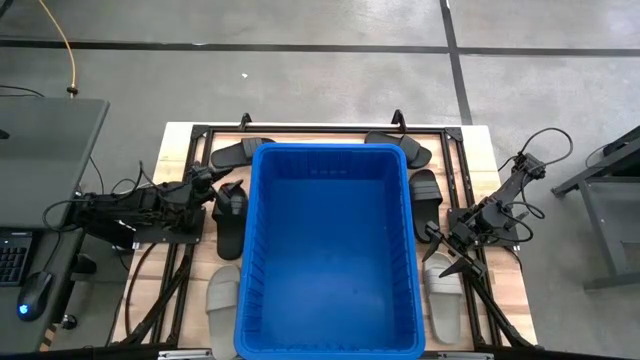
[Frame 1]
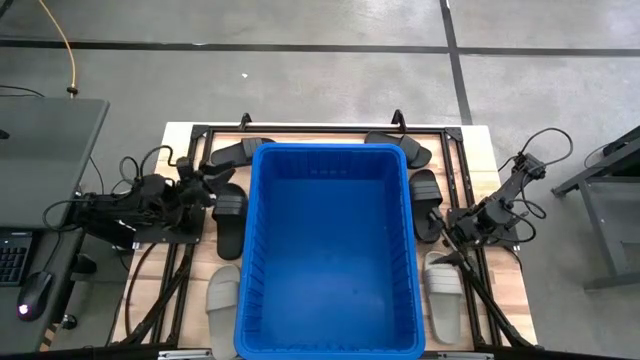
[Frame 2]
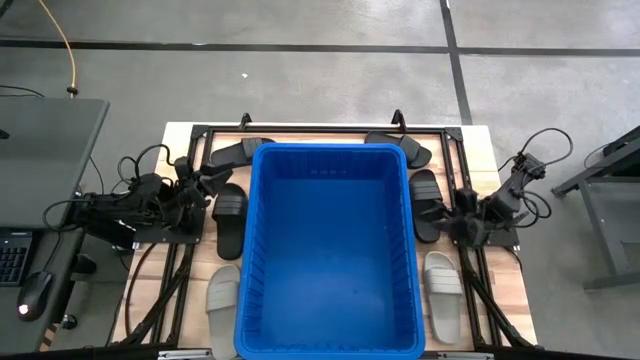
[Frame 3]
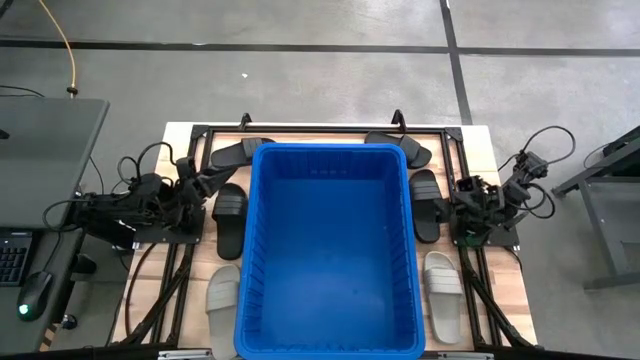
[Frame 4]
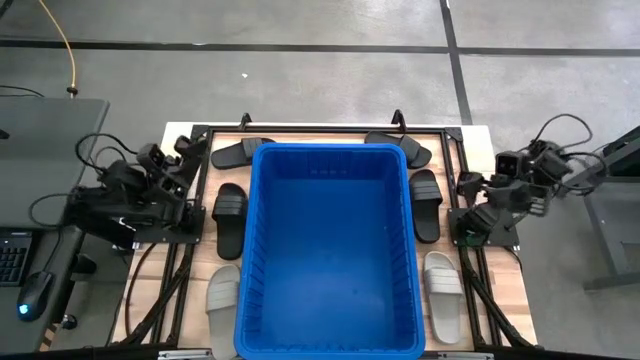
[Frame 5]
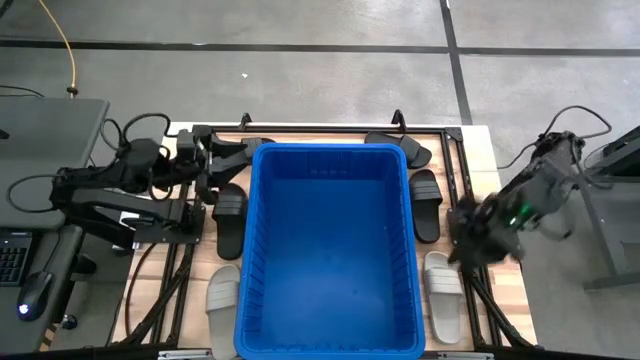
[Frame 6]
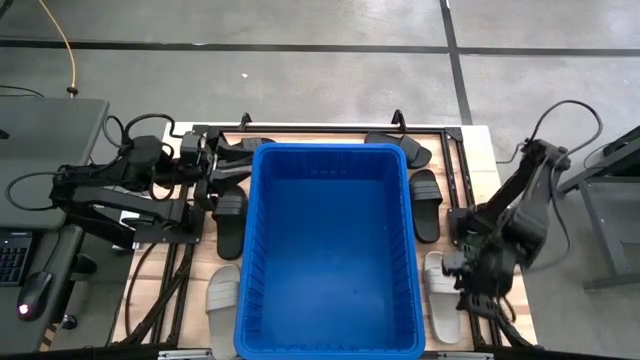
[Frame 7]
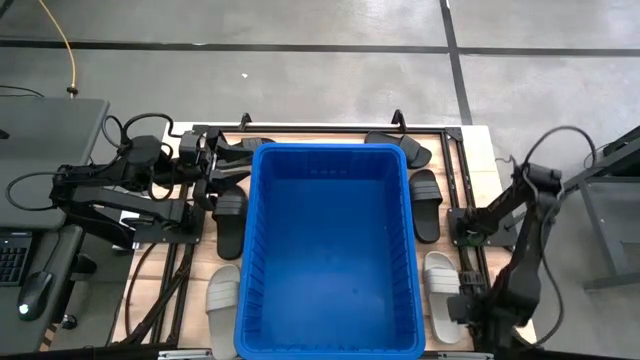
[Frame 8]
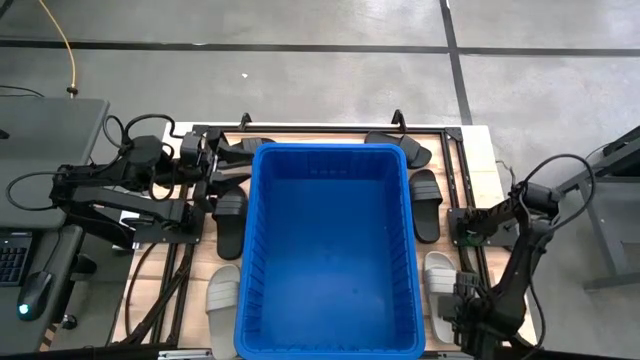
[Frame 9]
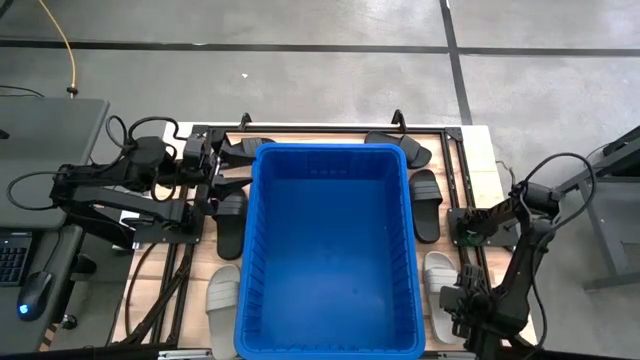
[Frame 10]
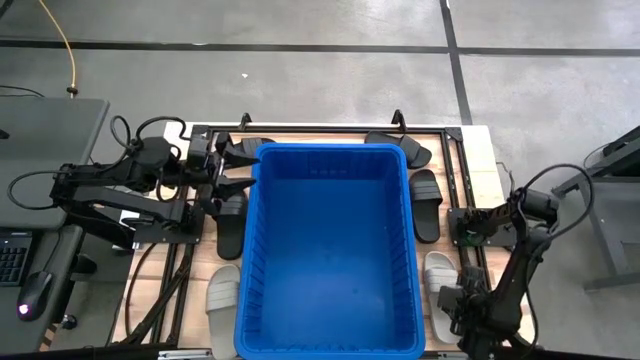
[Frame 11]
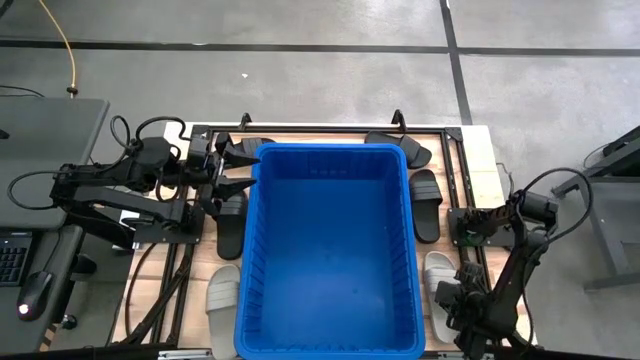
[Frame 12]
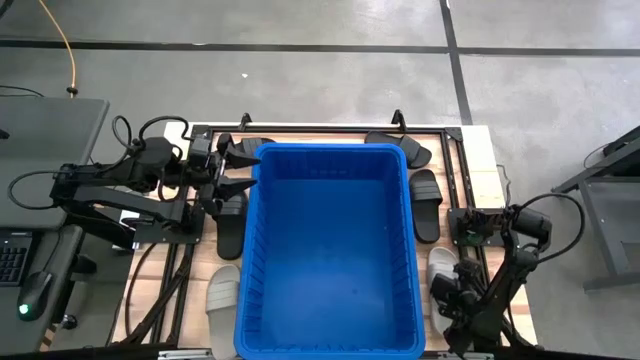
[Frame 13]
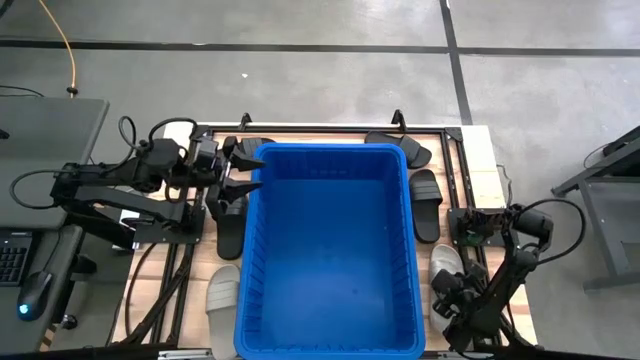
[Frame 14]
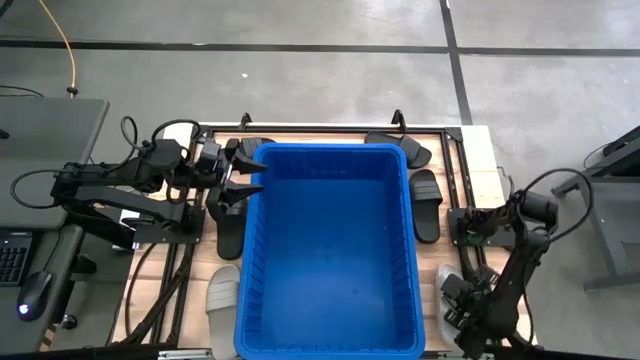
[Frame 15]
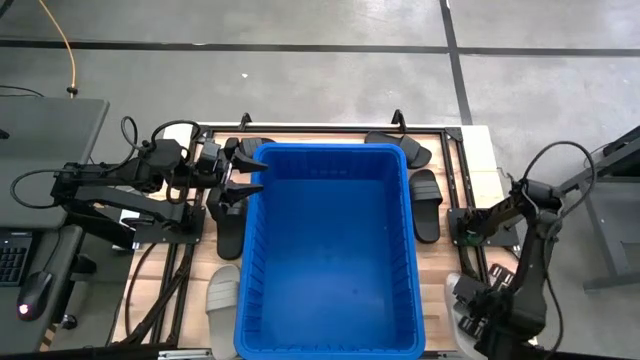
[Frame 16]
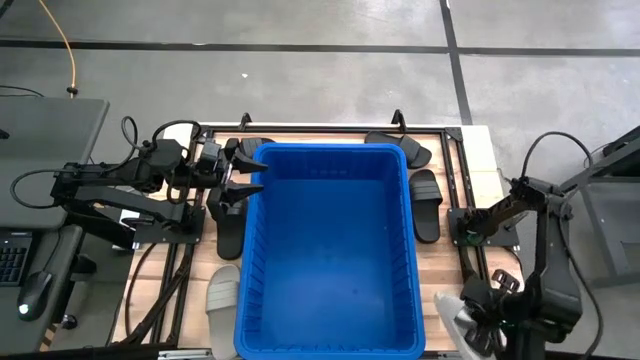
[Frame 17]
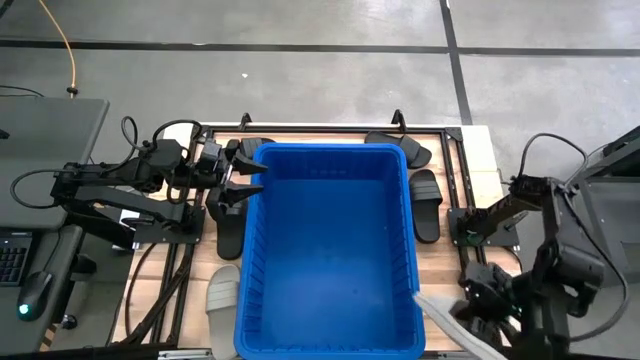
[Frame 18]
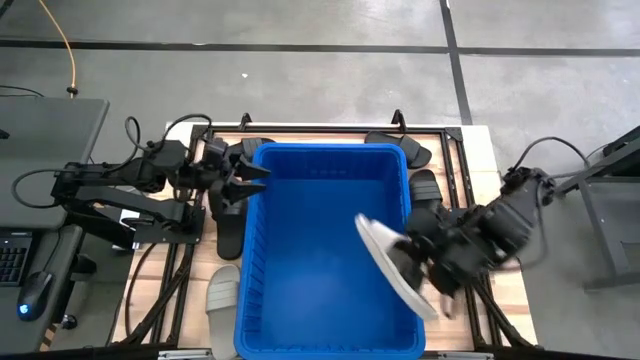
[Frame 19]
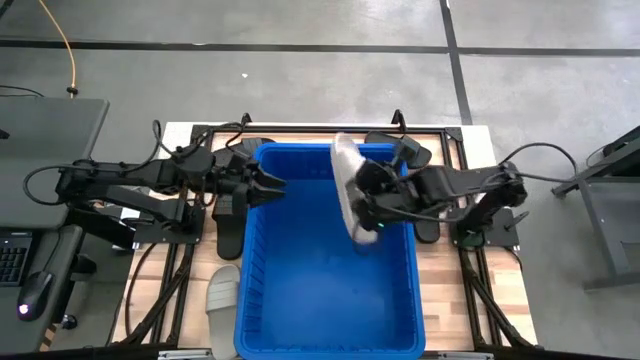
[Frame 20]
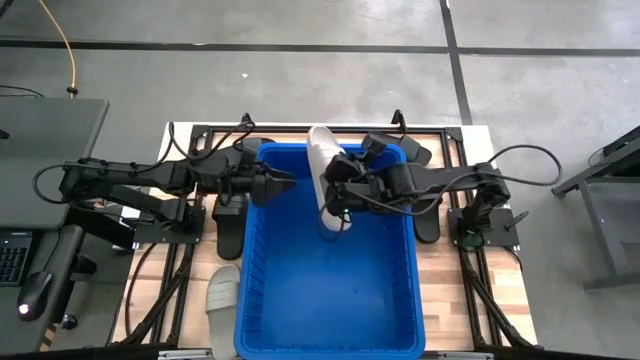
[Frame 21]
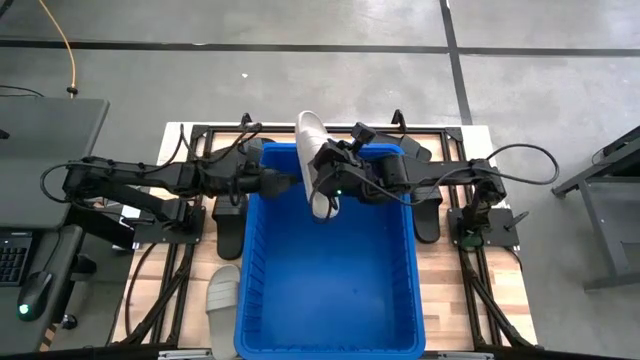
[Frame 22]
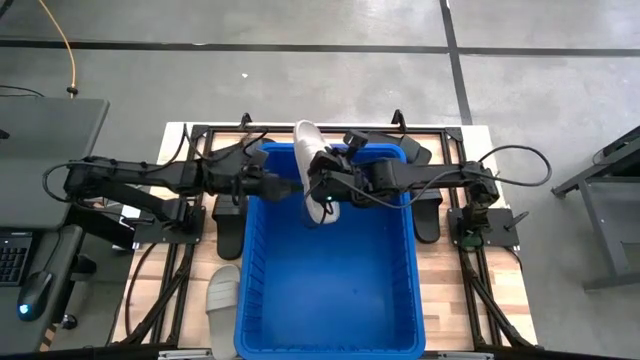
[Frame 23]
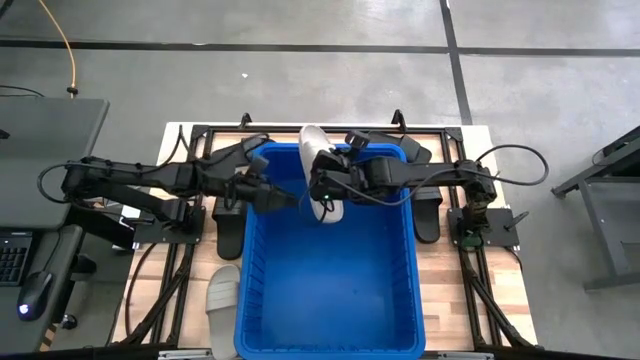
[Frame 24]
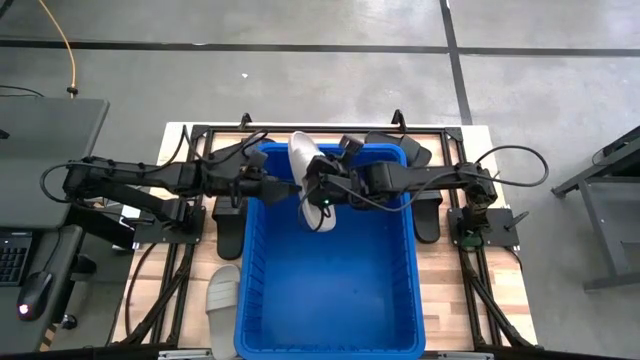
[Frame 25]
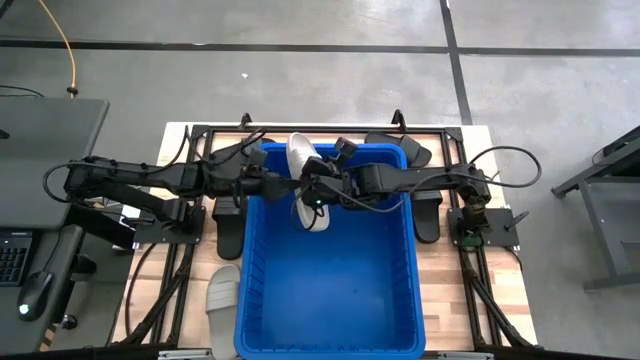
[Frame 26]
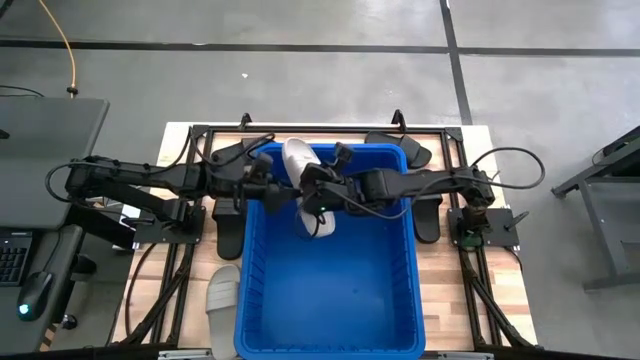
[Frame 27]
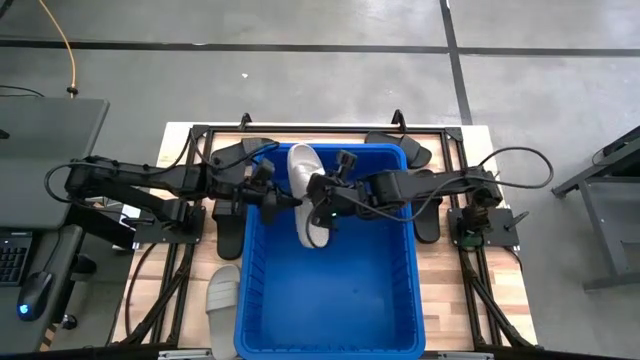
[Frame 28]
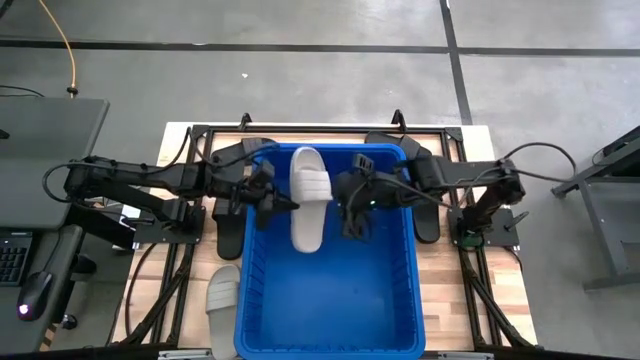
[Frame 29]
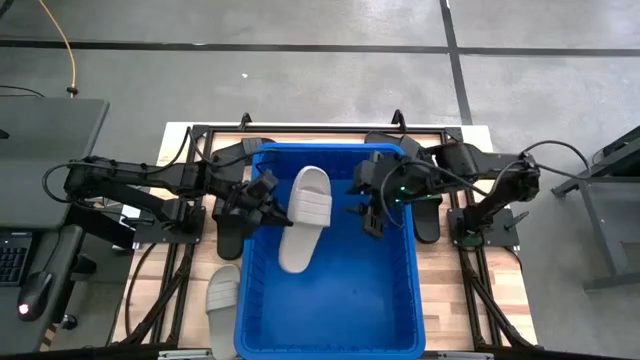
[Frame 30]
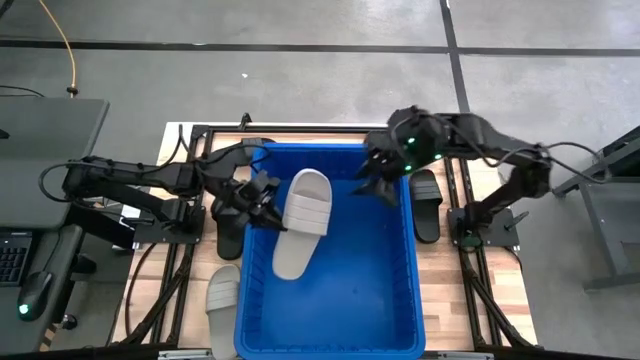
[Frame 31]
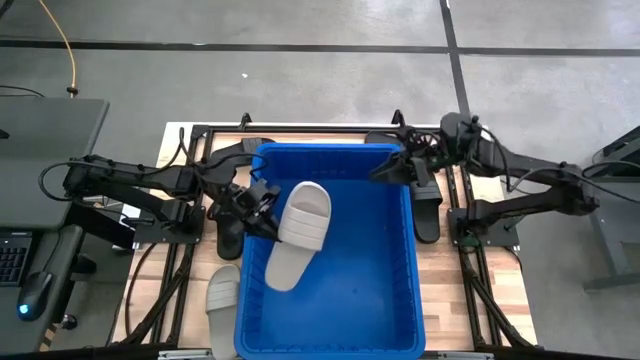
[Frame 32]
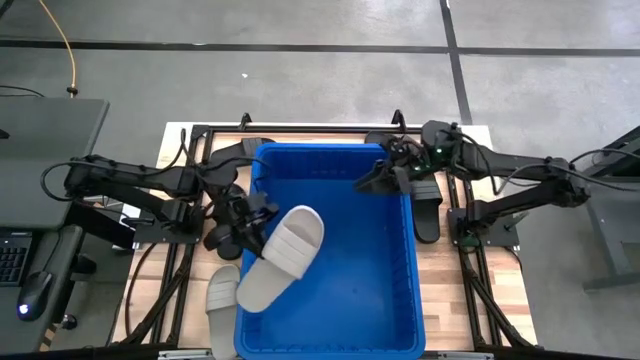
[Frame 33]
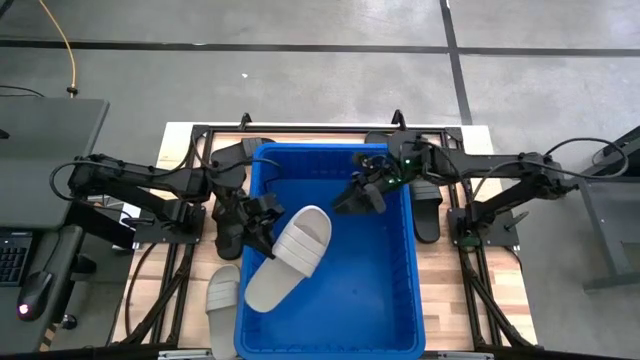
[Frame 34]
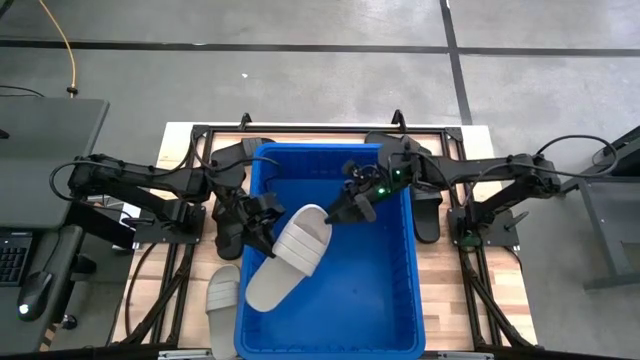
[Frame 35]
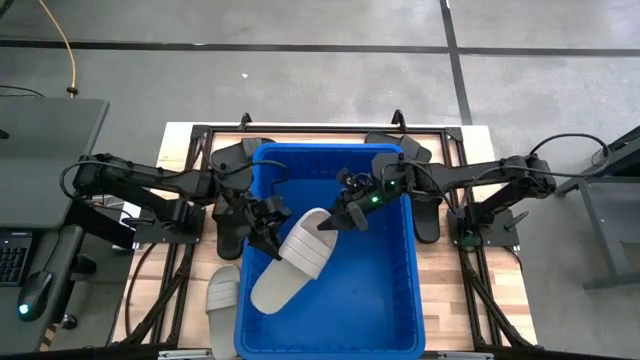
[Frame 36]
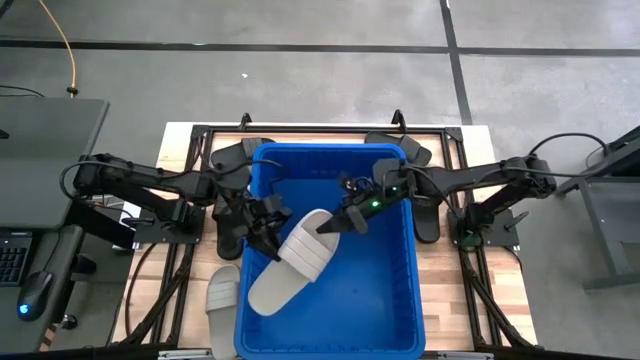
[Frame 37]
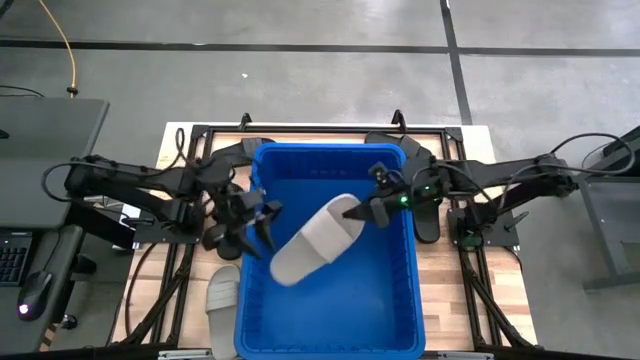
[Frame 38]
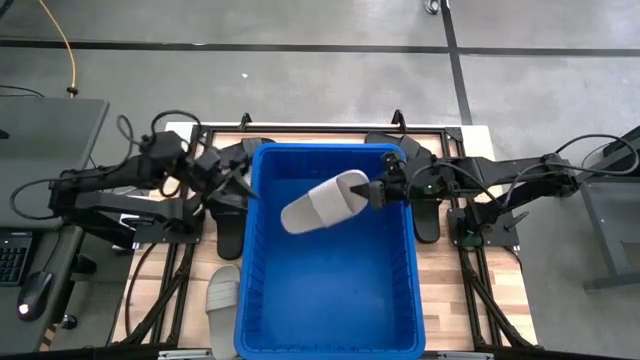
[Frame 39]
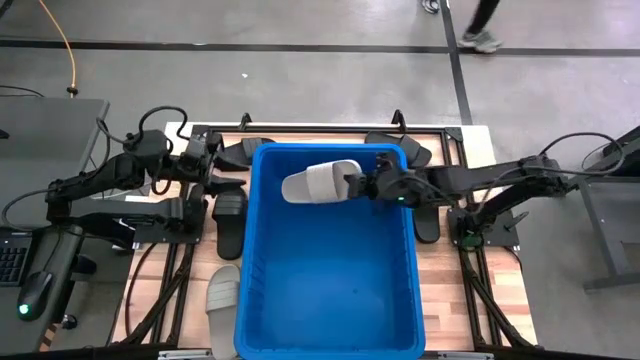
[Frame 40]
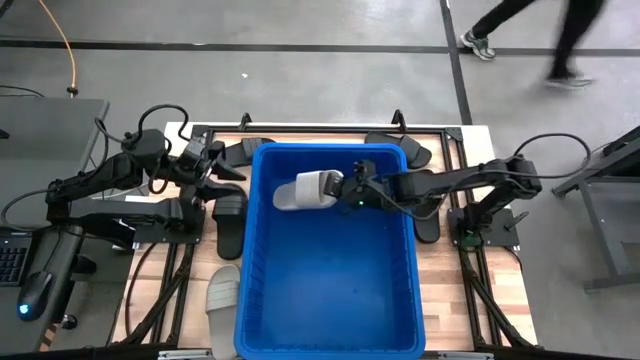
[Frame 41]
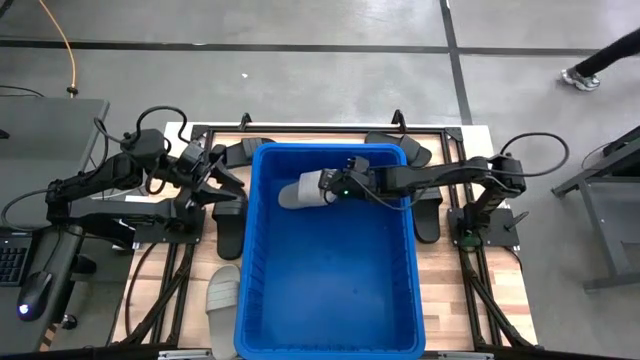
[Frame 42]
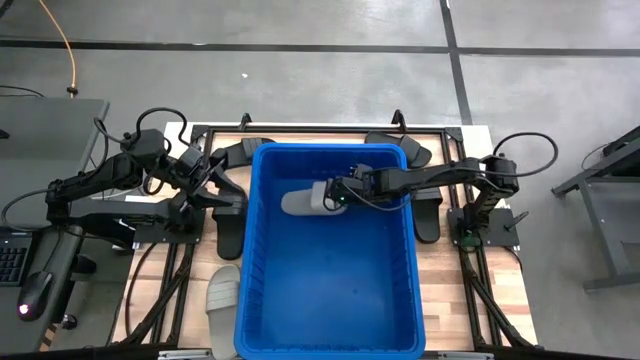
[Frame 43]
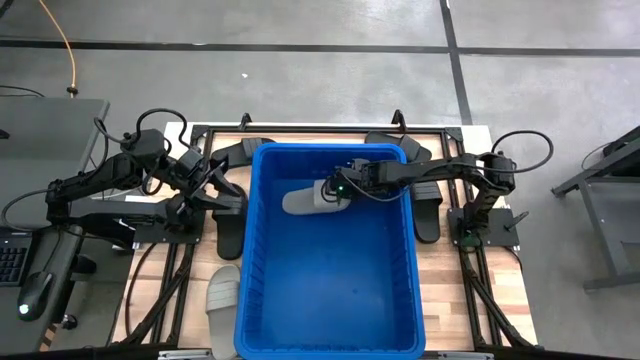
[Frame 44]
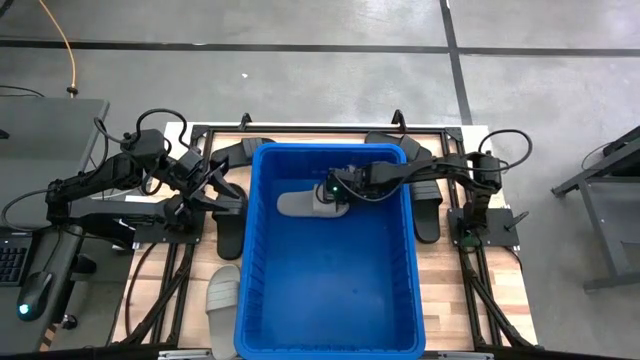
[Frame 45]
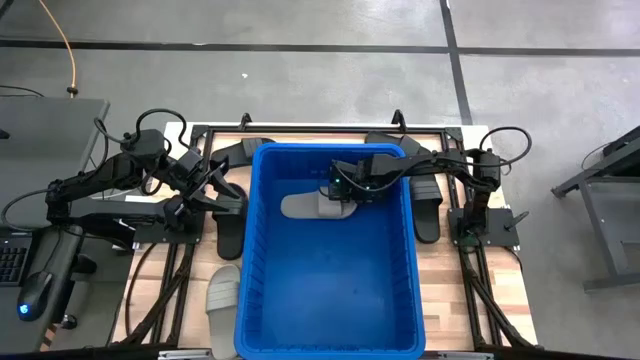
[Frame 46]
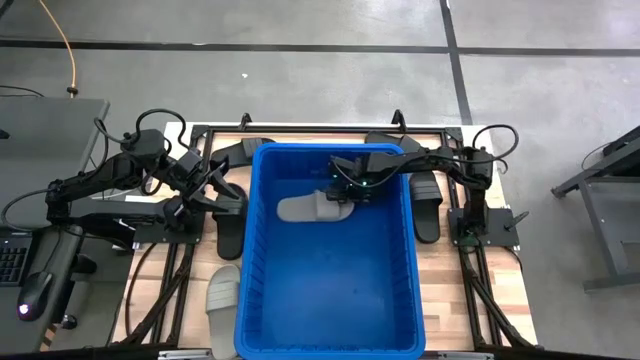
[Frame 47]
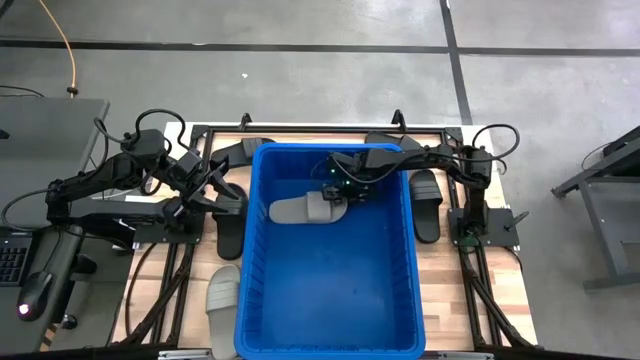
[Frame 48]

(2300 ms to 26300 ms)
Task: Pick and place slides into bin
Put the right gray slipper into the blue bin
